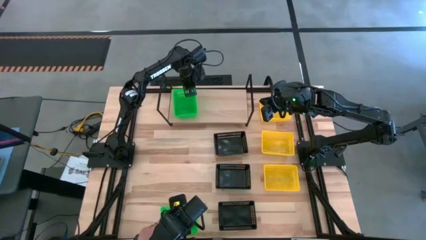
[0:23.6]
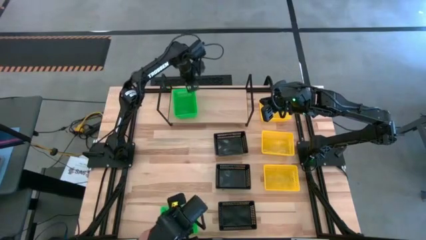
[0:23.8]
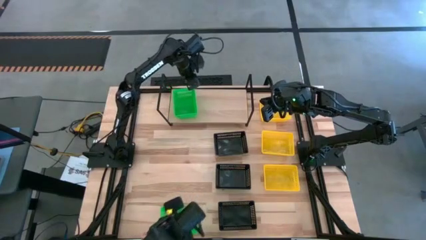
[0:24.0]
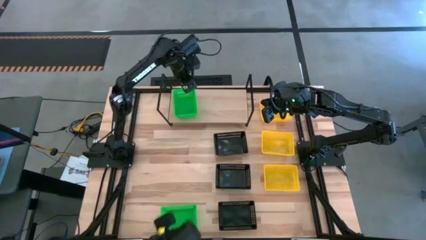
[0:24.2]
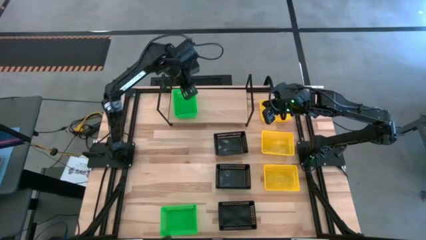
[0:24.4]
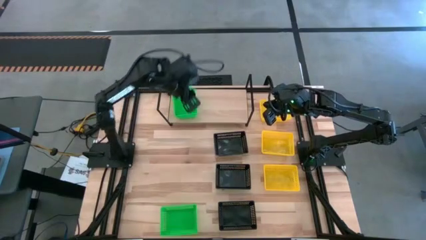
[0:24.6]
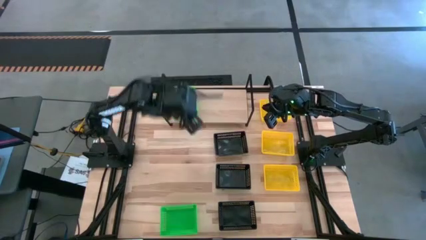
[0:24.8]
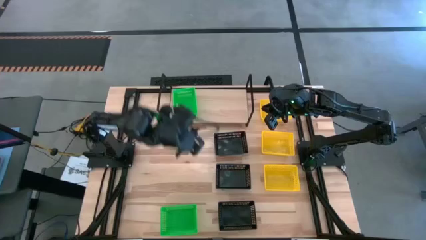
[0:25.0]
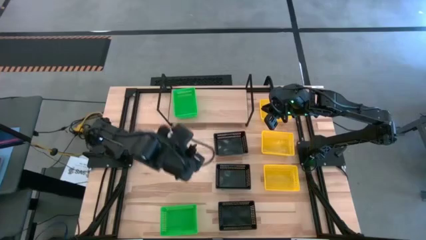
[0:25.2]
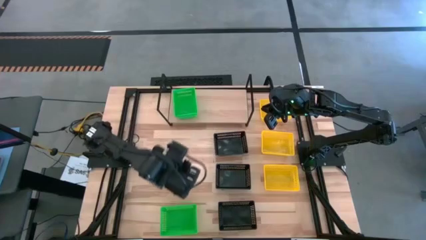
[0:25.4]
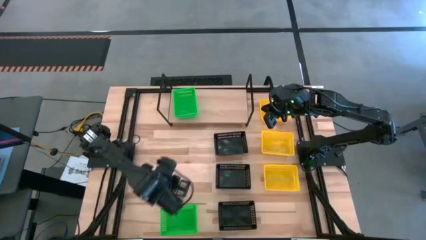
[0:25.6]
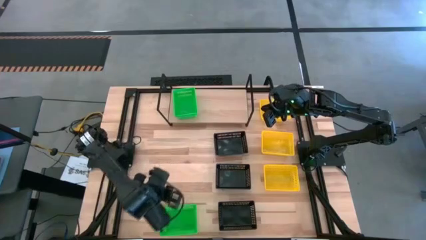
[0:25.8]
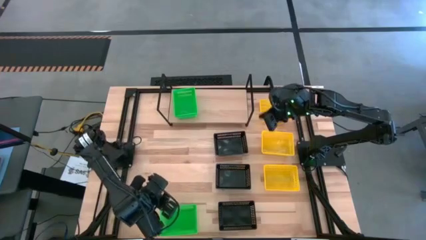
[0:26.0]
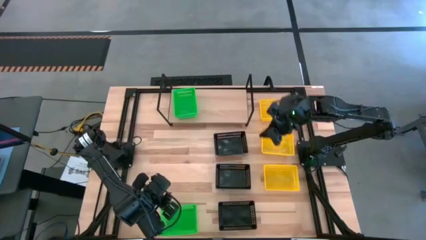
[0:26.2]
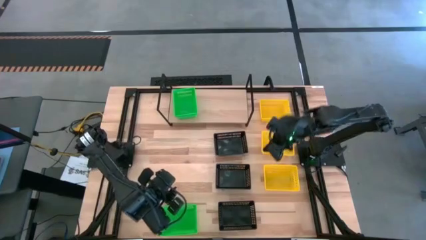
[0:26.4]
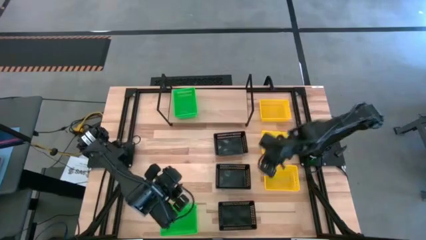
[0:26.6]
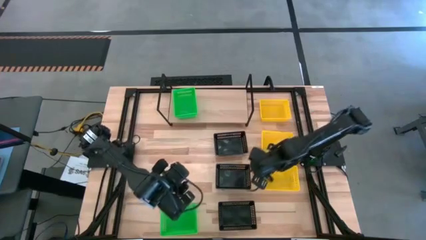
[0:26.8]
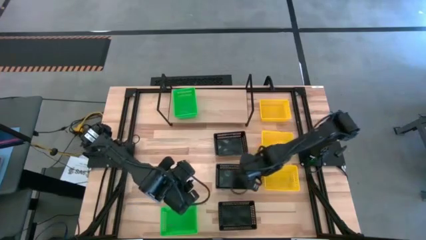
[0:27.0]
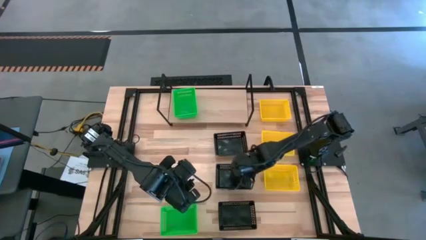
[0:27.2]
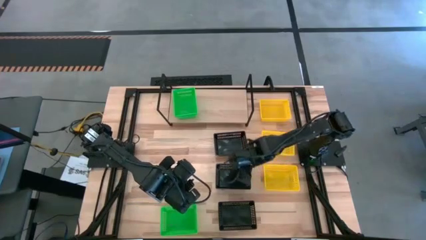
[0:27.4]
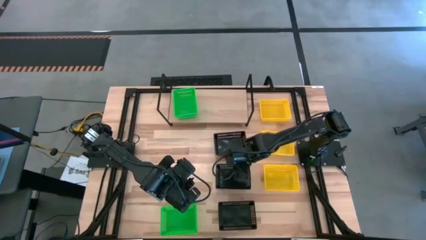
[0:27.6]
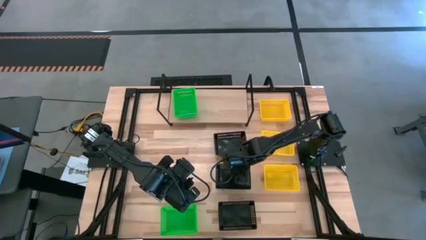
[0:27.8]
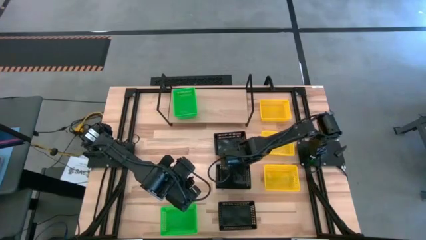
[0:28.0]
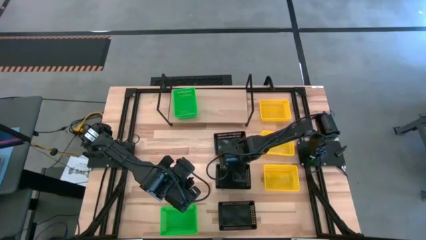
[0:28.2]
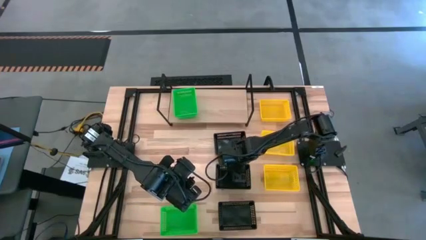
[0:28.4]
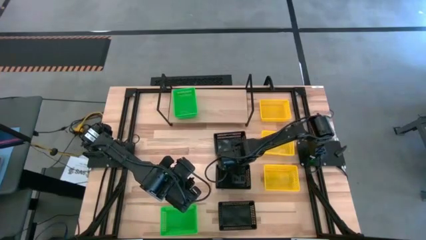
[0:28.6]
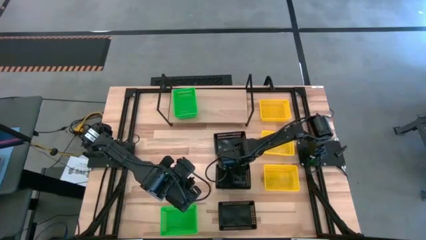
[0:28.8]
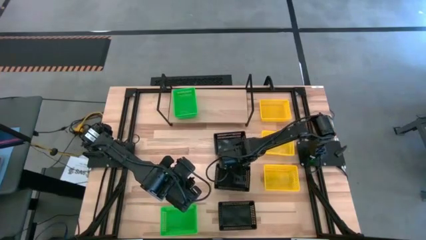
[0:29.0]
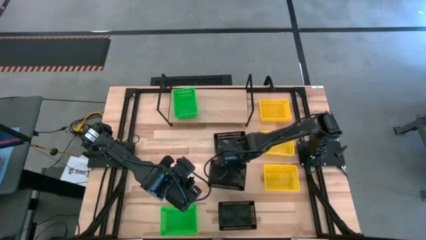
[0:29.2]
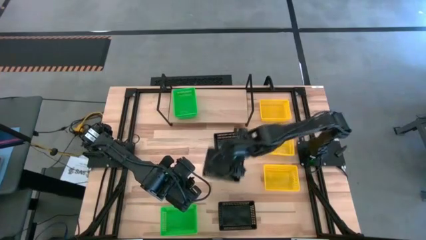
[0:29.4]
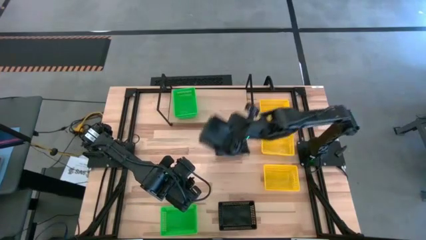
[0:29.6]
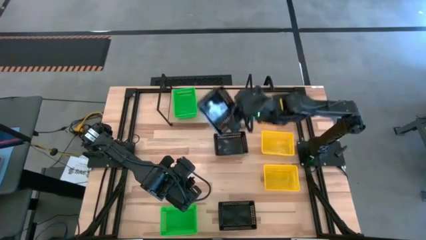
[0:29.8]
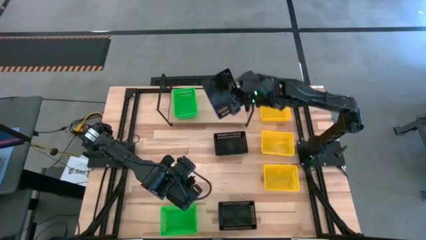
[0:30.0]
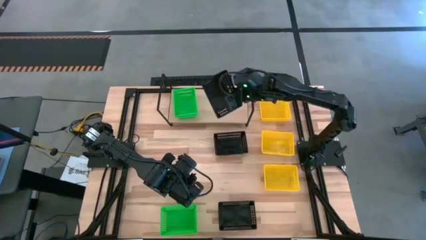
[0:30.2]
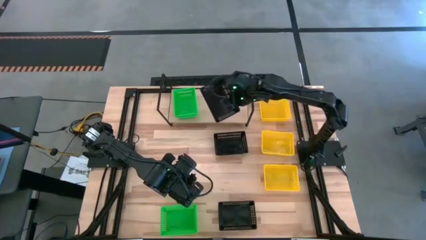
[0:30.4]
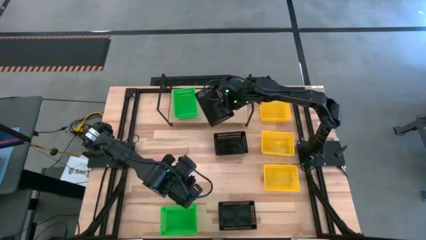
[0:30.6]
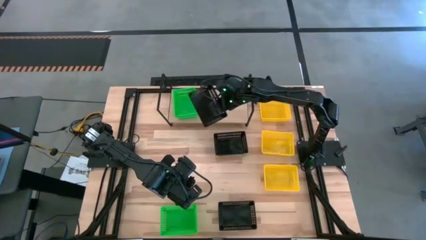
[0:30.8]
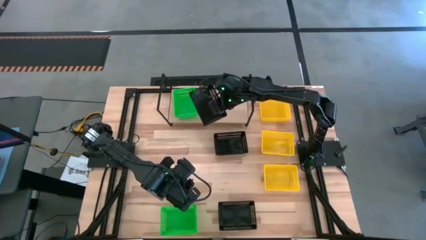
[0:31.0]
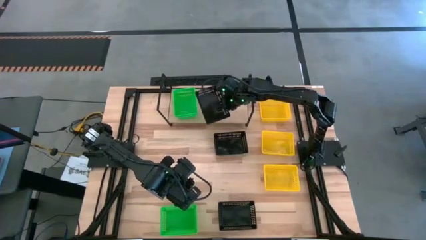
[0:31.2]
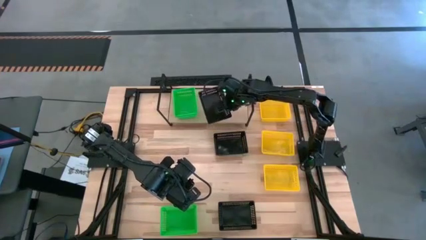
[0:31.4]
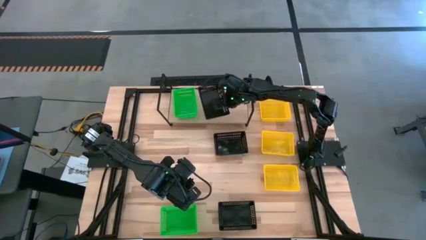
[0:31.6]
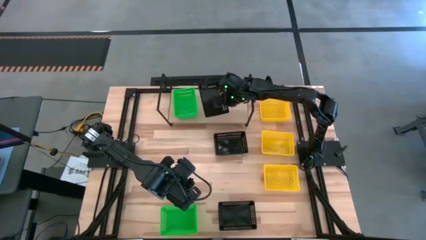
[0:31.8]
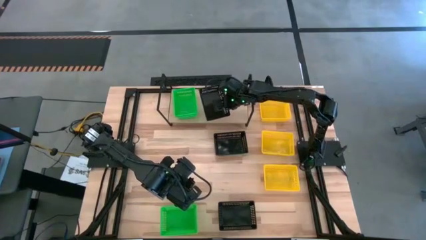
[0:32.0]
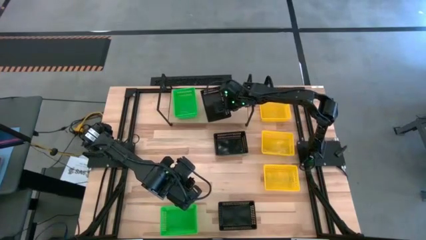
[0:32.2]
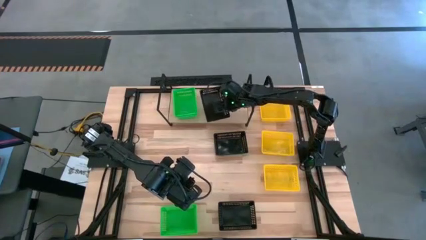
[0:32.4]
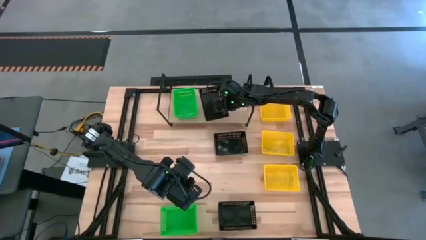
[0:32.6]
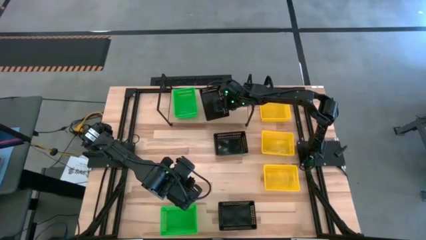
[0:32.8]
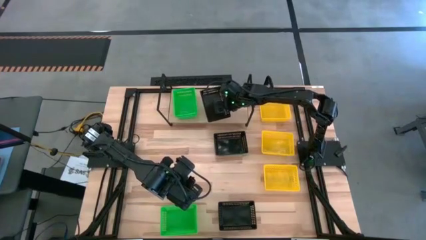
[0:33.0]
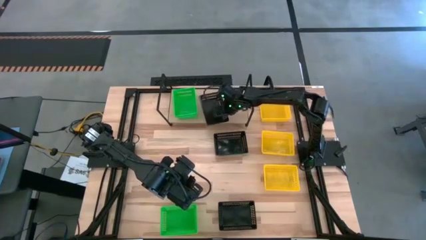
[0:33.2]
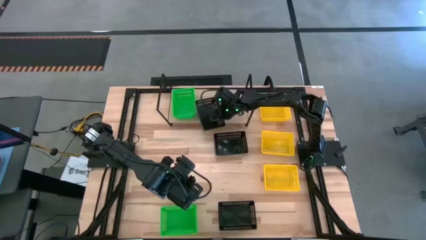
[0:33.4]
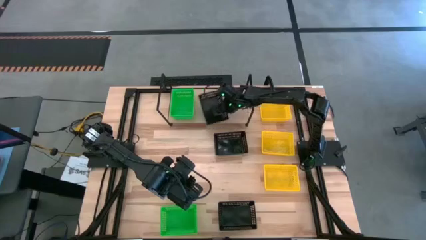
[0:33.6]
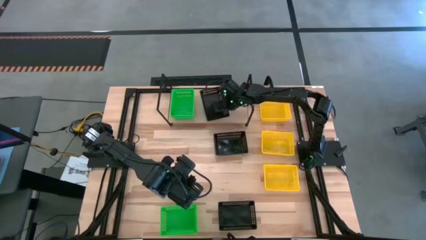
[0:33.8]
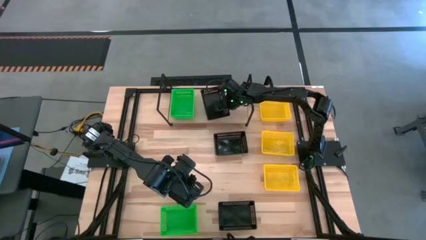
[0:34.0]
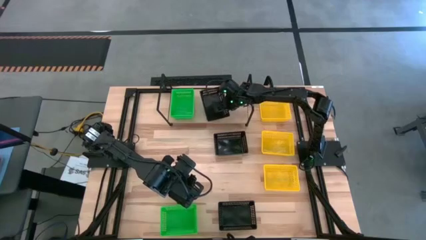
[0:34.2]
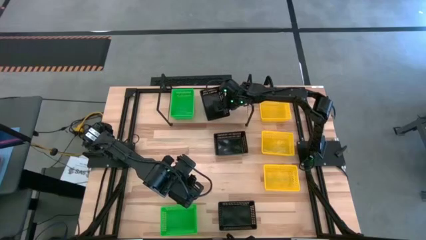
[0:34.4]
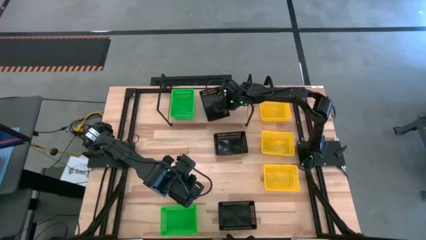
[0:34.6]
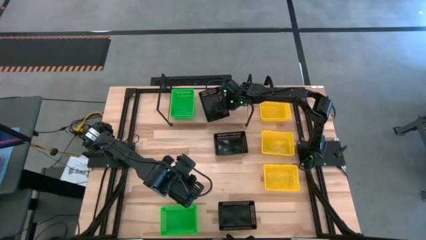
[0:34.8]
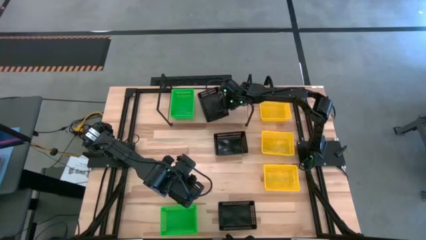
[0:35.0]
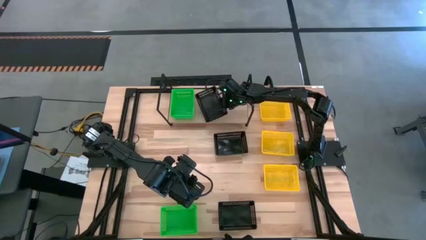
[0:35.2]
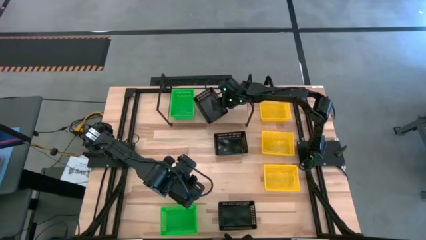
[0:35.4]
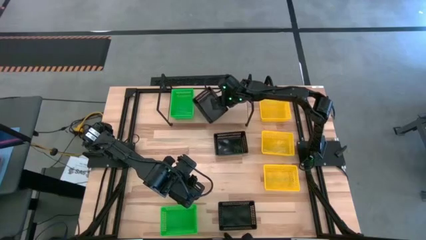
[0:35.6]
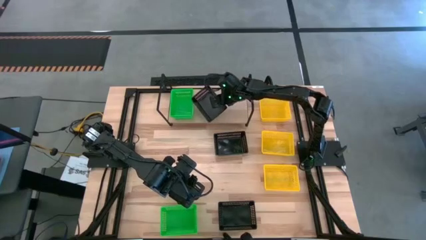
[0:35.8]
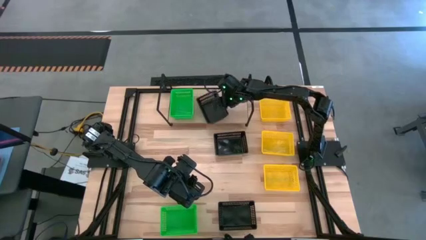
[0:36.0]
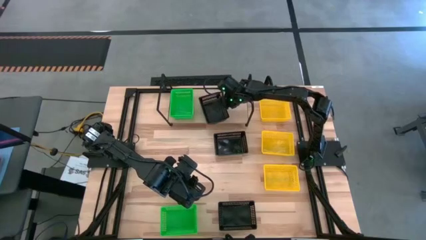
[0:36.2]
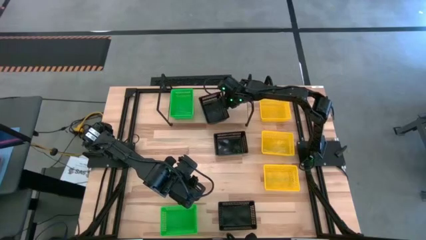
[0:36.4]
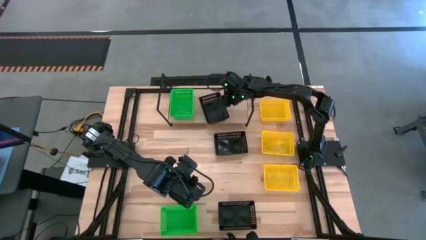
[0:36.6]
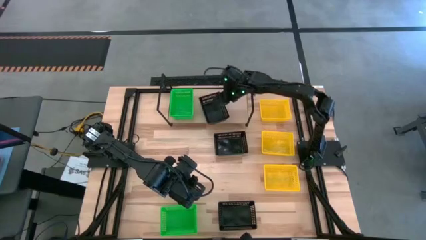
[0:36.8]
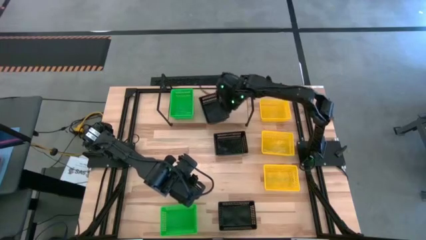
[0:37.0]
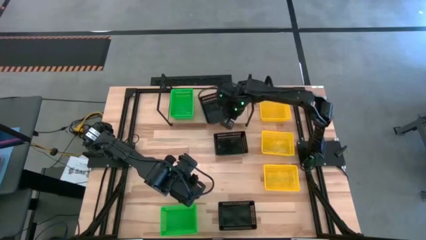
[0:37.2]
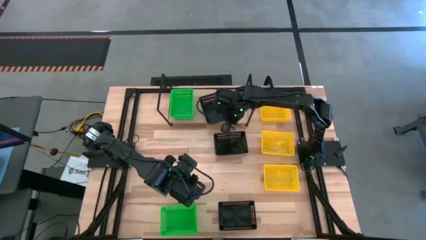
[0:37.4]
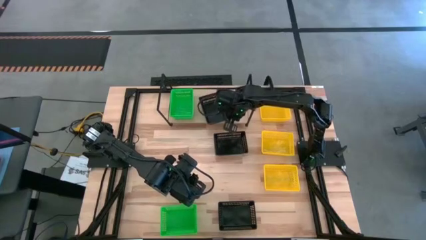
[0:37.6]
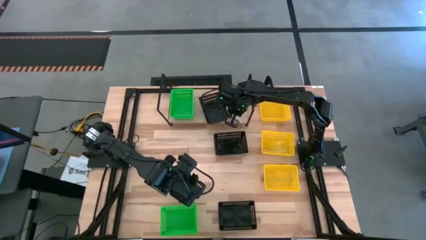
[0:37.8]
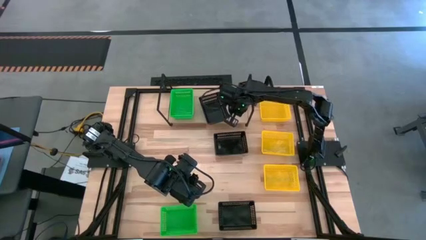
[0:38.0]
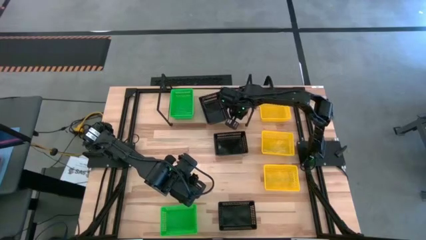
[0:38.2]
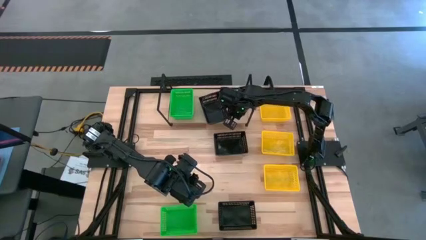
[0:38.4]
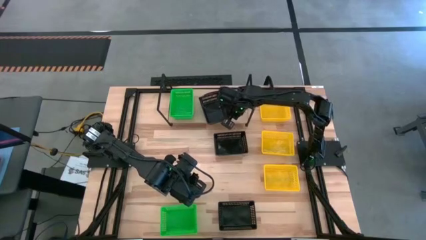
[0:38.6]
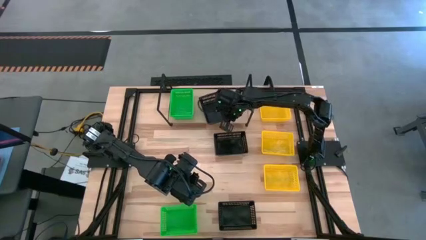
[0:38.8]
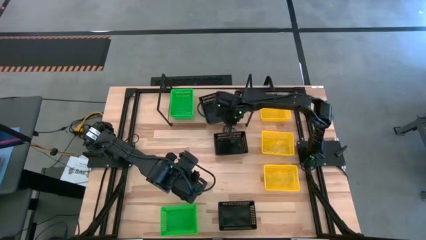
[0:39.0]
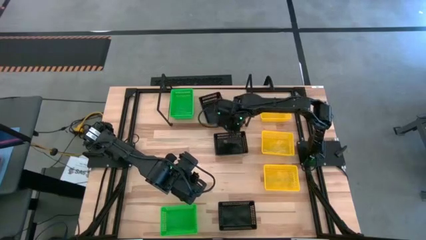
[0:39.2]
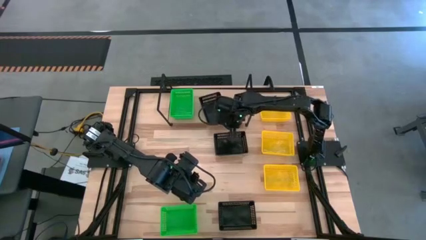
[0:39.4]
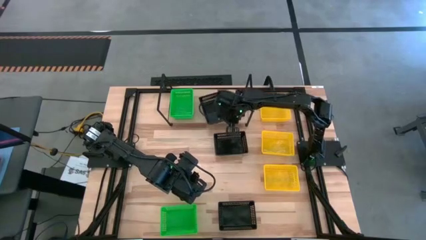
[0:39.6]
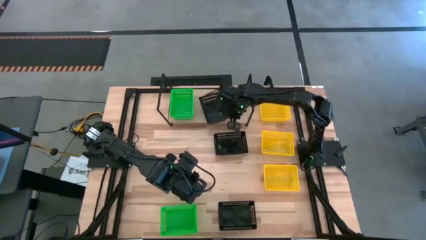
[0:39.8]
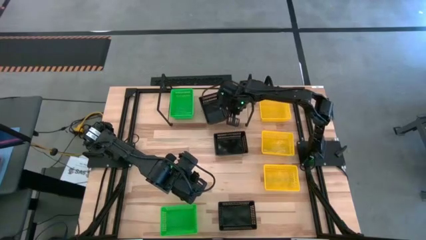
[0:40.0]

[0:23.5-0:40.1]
Task: Stack baskets on shelf by color
Put the middle black basket on the shelf

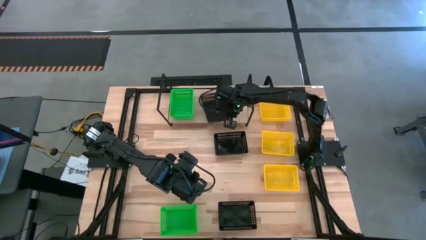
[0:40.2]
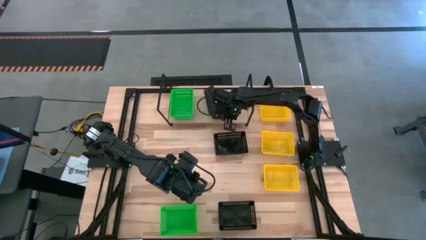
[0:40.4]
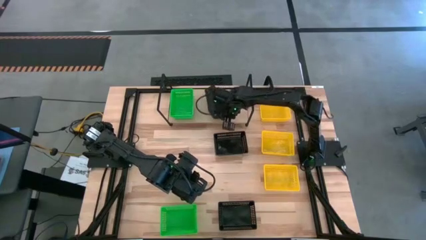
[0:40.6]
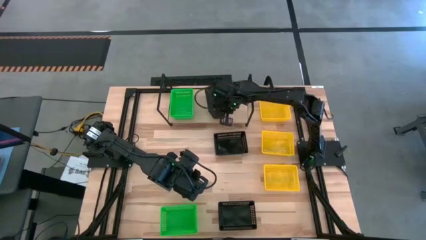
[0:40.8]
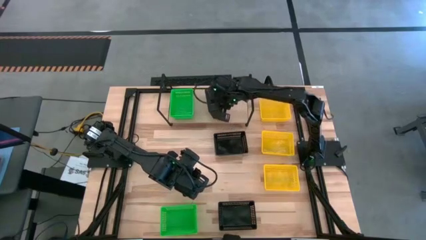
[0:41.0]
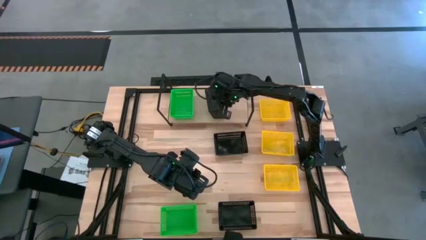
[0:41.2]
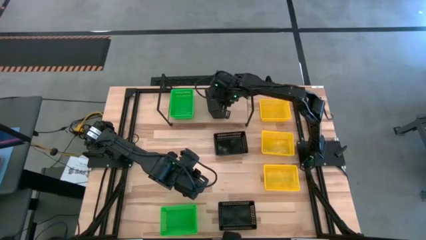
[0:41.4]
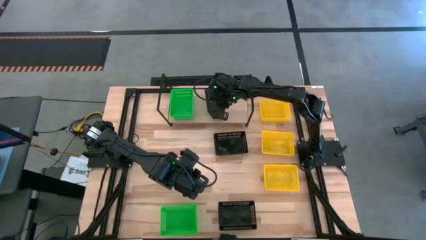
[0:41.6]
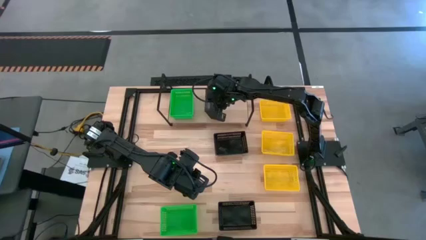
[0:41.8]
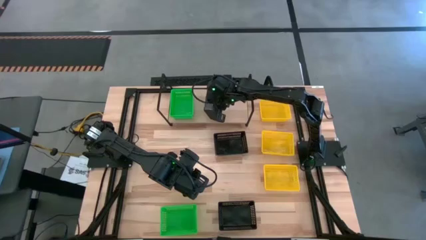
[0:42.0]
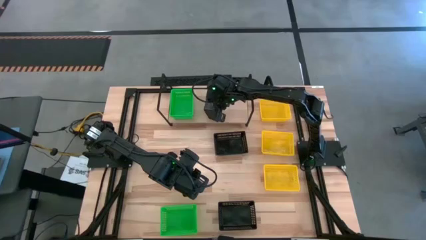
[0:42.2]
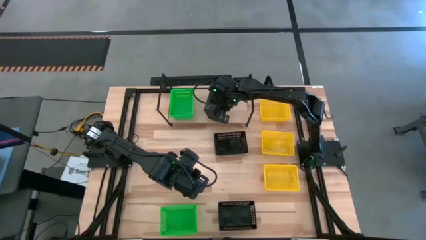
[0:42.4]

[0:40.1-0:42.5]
Put the middle black basket on the shelf
